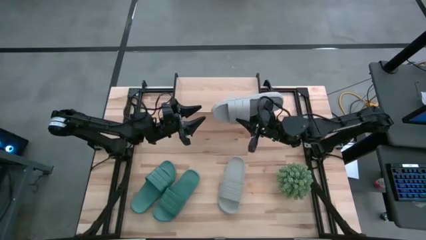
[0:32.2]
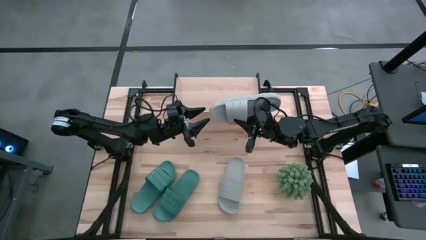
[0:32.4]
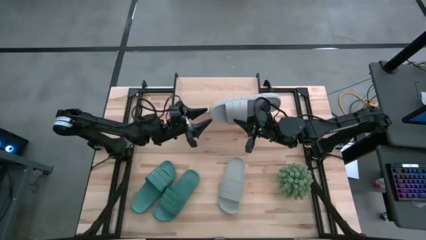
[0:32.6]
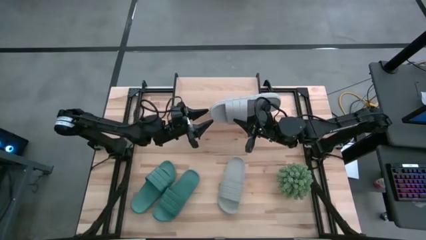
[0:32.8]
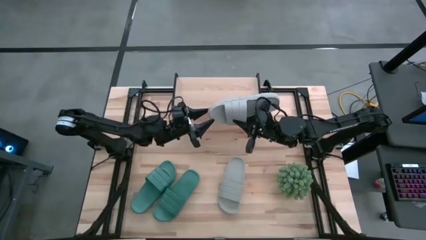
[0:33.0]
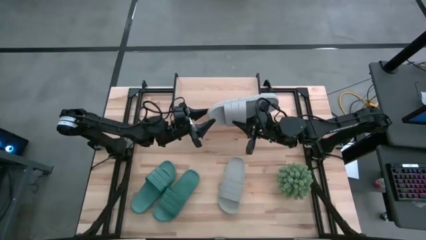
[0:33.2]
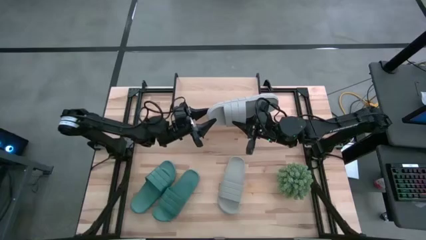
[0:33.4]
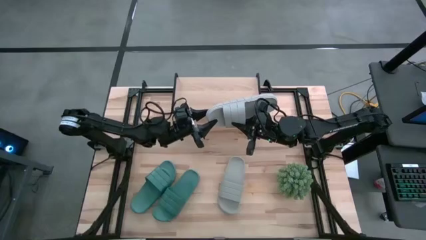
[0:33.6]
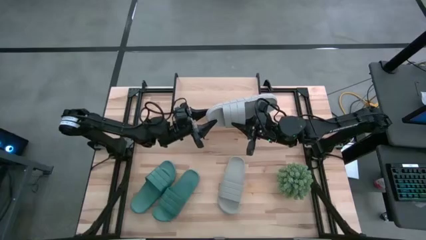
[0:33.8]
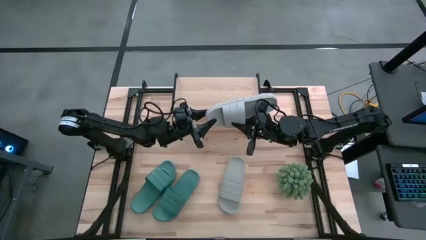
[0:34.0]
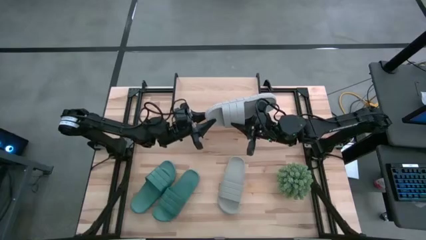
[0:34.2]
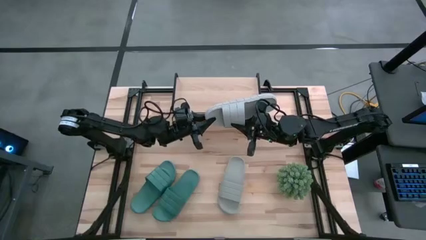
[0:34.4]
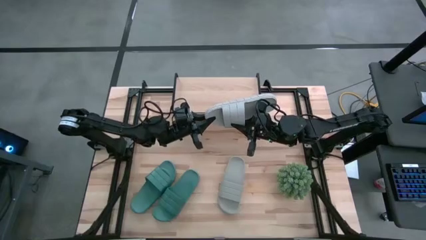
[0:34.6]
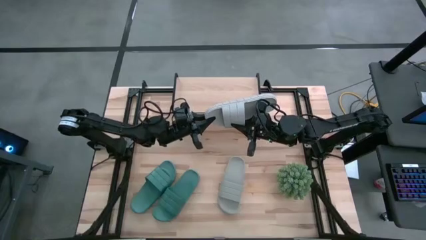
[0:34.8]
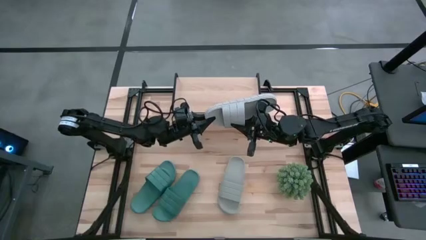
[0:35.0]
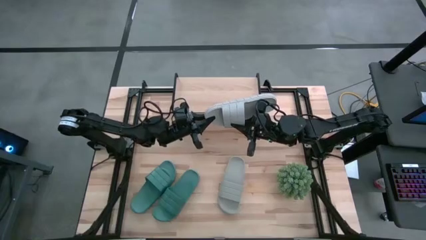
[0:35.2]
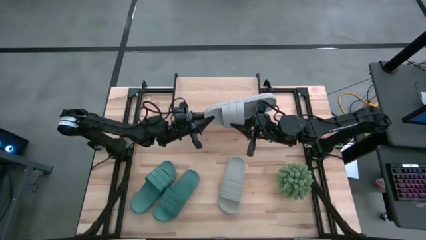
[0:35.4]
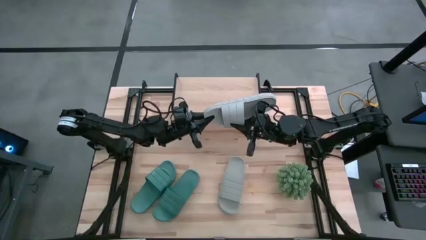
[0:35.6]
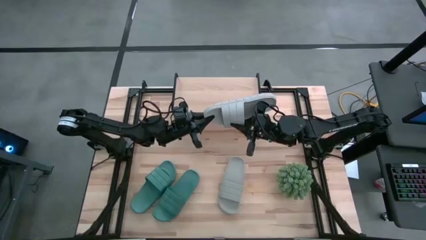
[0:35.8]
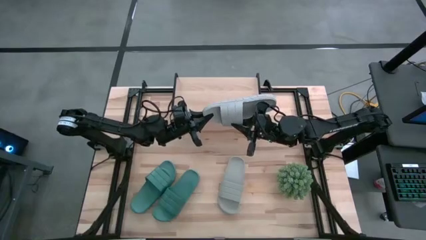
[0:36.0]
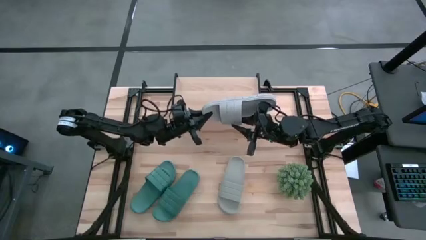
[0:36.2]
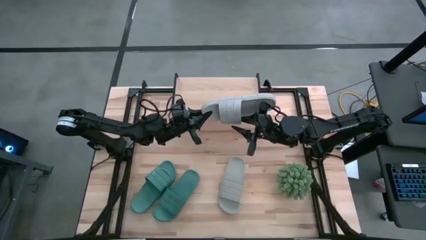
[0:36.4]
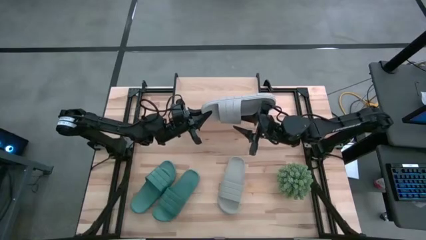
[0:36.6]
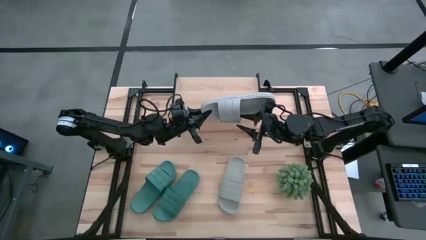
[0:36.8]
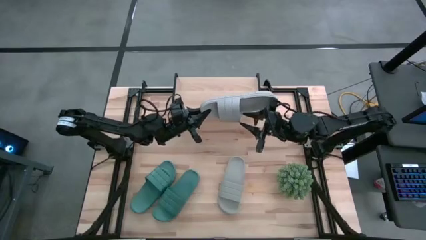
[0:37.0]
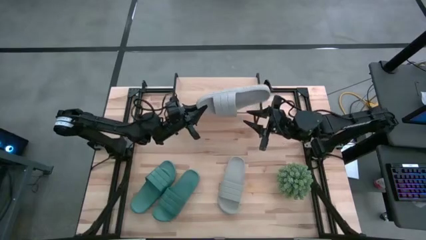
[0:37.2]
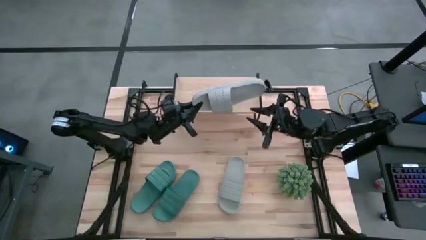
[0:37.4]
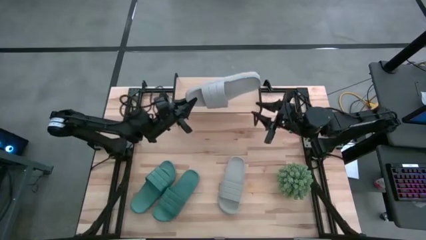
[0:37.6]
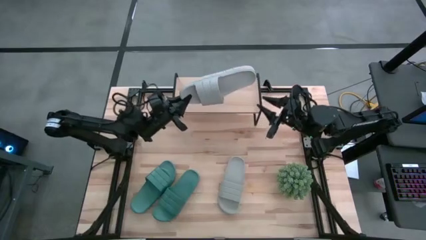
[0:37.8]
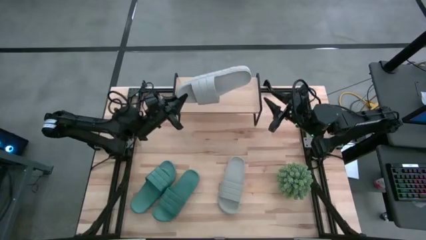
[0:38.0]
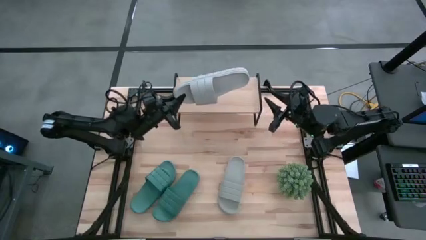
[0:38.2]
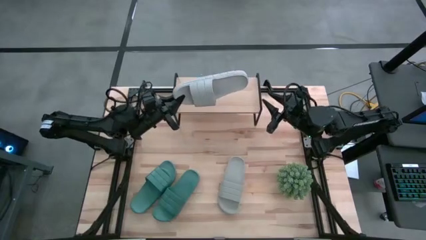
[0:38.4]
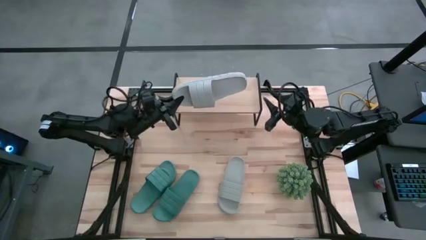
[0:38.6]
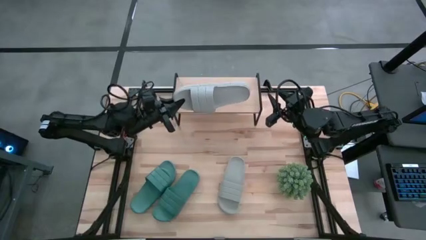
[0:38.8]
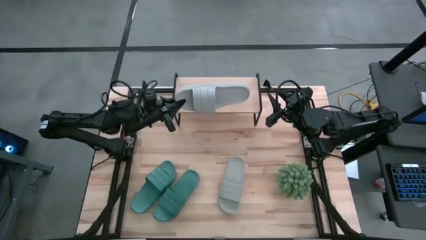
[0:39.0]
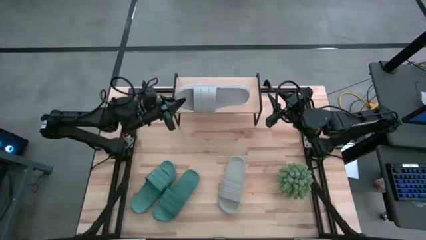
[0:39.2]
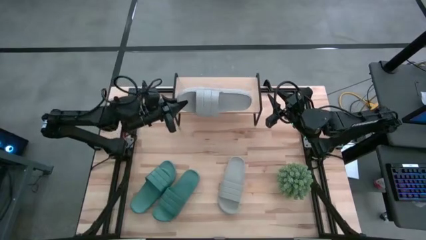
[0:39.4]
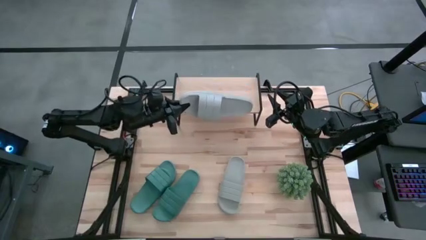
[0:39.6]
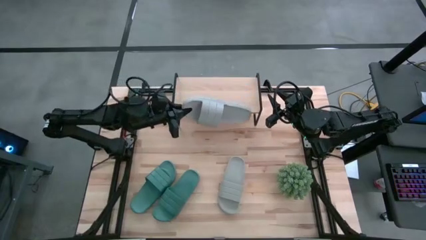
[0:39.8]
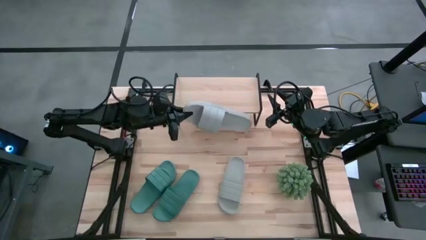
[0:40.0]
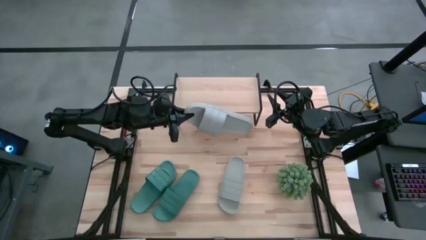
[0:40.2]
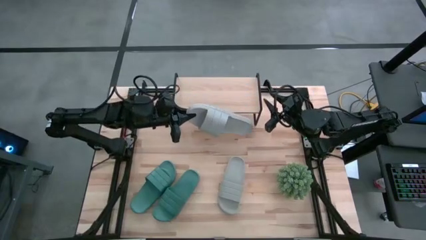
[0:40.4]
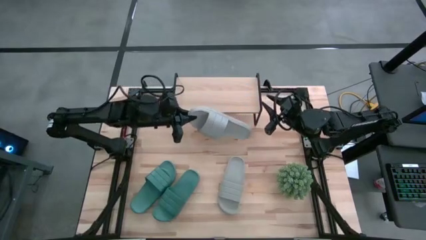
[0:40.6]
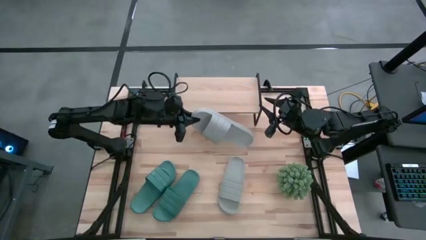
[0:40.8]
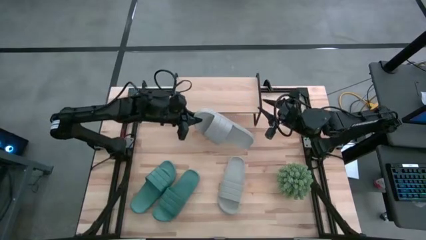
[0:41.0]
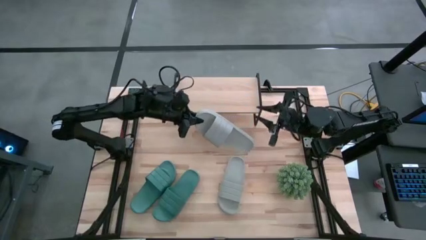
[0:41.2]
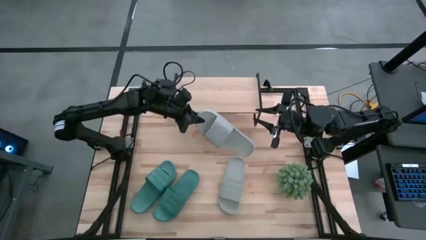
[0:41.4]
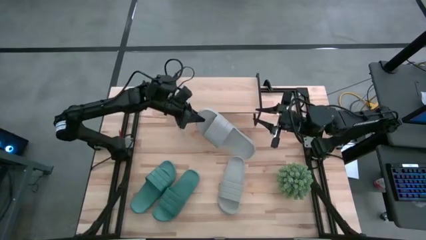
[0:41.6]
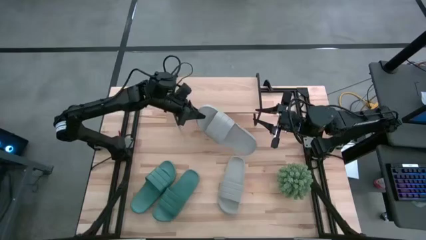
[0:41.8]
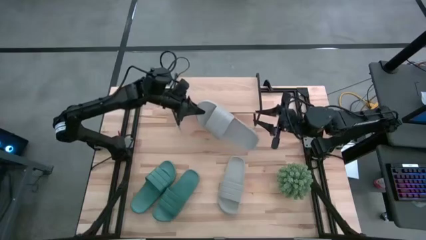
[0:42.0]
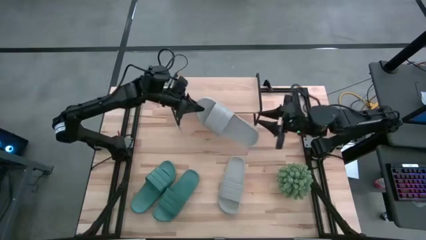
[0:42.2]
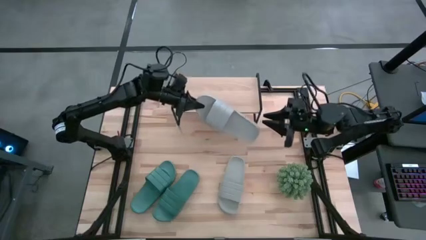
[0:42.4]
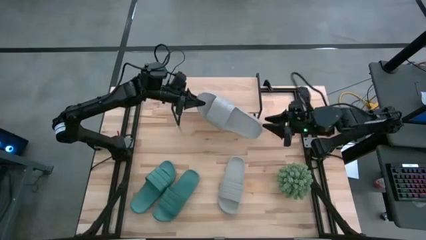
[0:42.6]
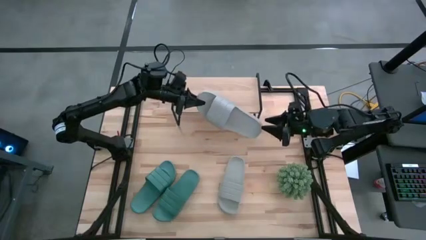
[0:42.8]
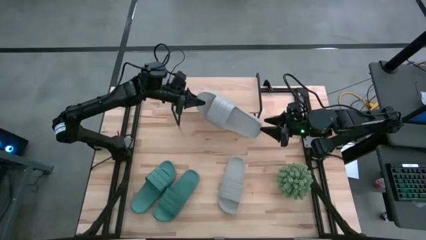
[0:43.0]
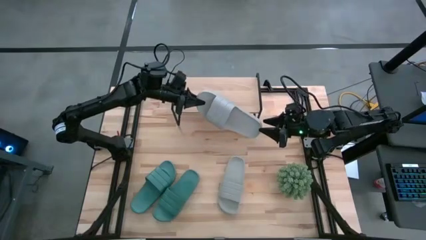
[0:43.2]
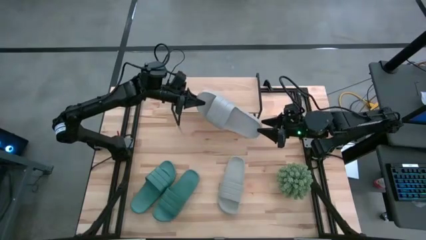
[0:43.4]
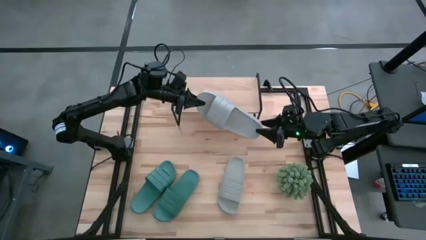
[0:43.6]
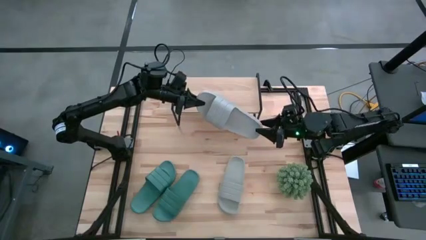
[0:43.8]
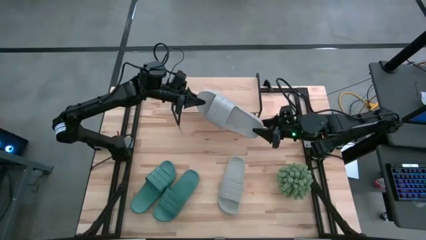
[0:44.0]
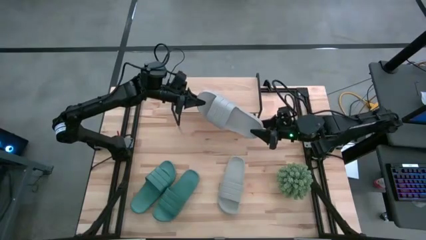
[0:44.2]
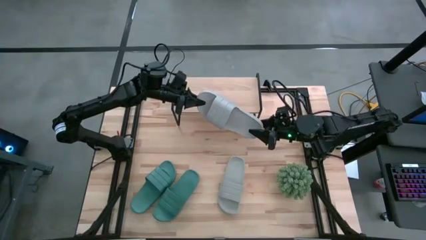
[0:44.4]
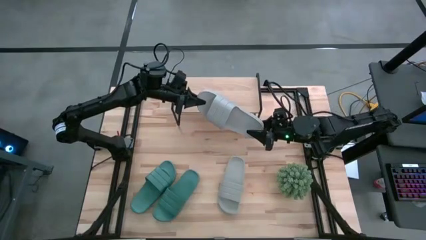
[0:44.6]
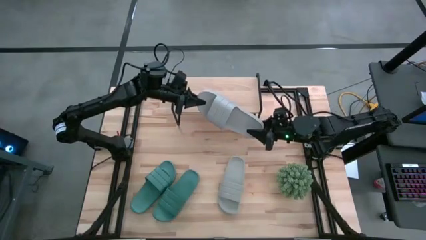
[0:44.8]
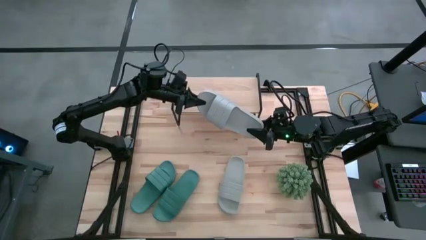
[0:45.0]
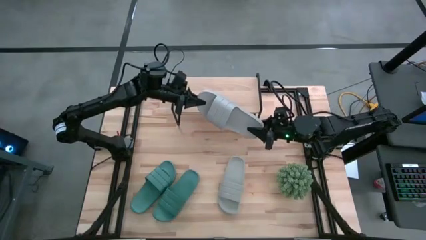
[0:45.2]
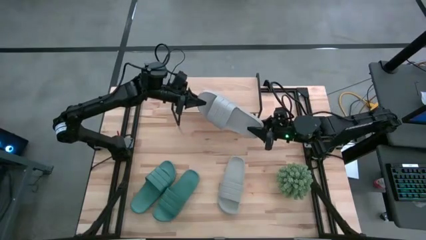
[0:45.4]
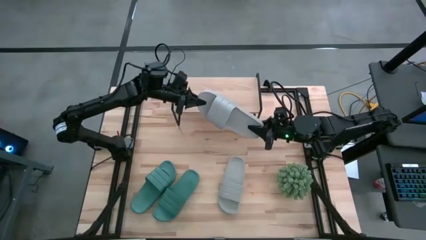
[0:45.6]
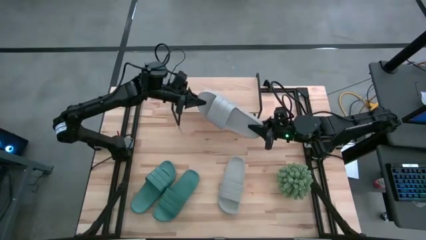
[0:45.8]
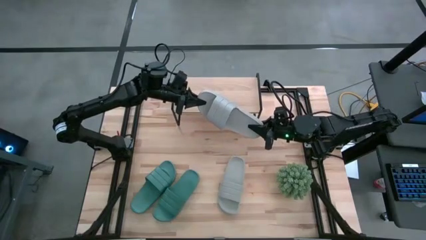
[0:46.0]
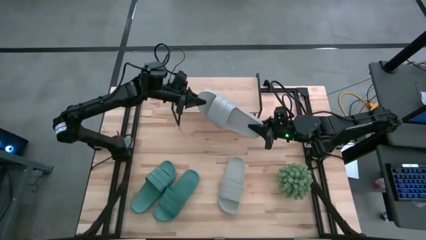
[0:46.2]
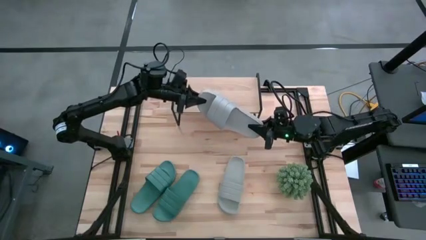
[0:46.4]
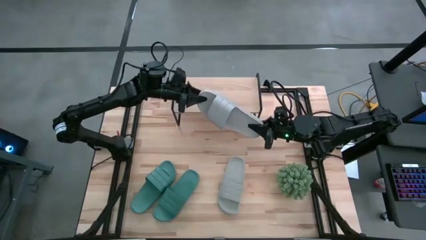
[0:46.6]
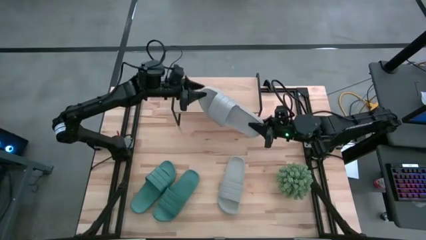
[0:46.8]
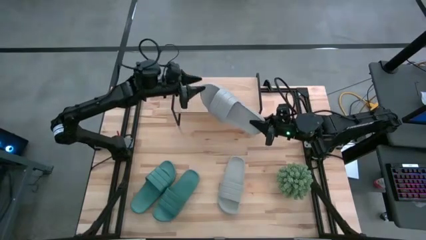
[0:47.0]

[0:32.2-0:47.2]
Task: Pick and place slides into the shelf
Put the right gray slide on the shelf
